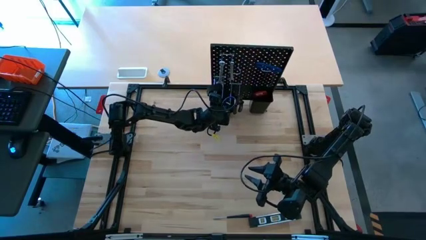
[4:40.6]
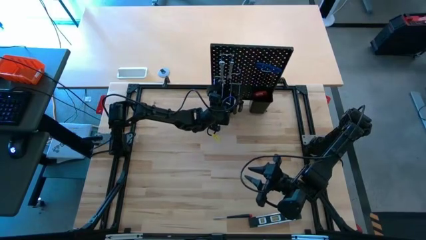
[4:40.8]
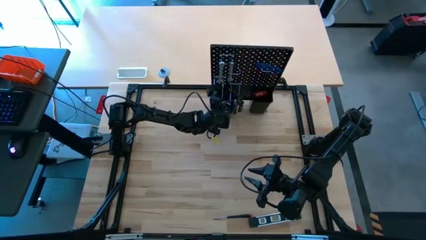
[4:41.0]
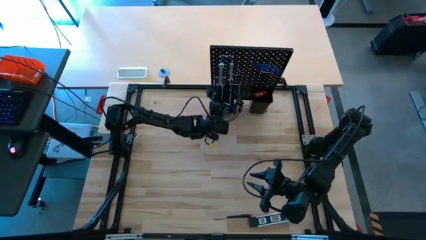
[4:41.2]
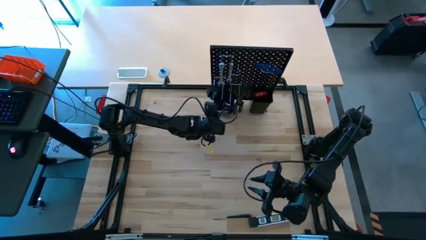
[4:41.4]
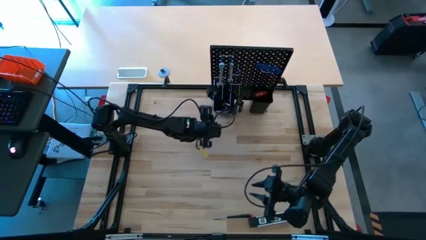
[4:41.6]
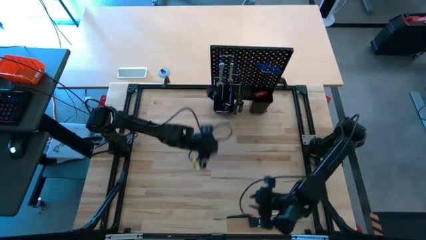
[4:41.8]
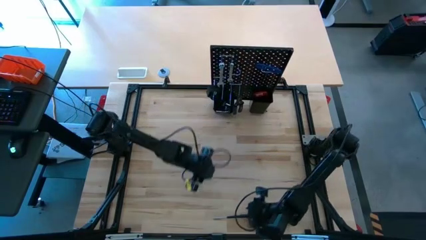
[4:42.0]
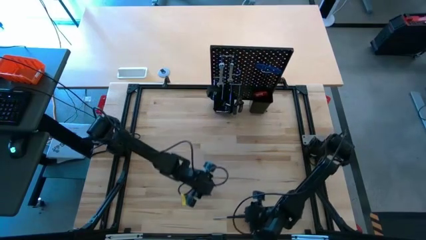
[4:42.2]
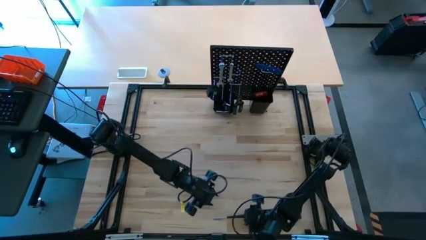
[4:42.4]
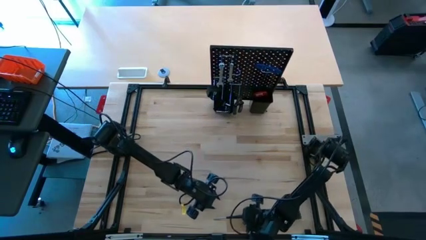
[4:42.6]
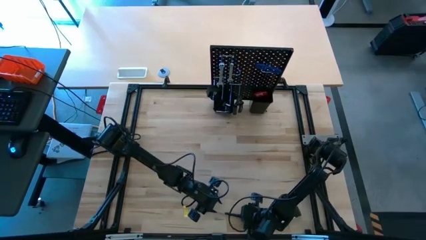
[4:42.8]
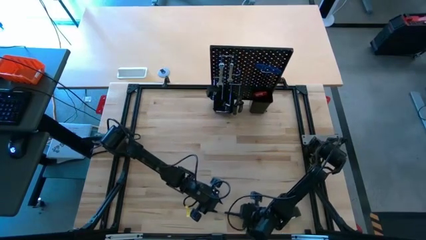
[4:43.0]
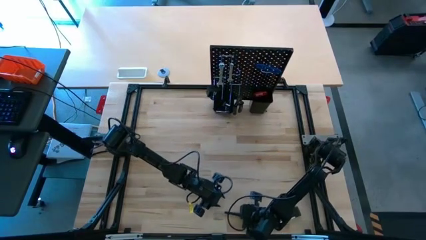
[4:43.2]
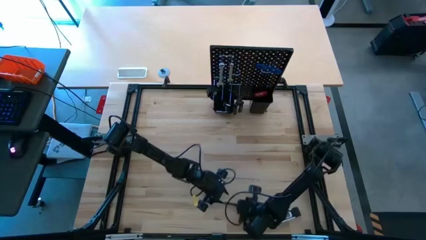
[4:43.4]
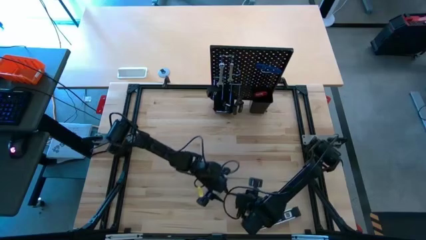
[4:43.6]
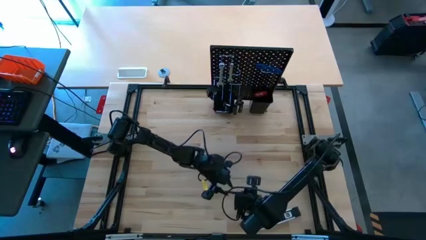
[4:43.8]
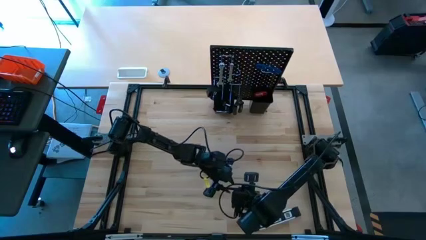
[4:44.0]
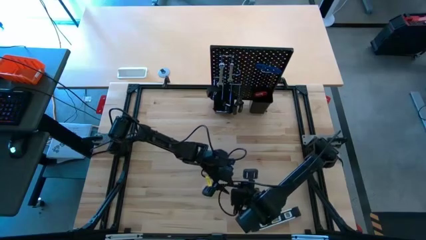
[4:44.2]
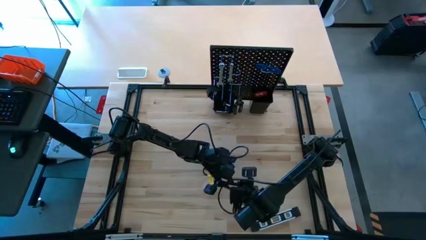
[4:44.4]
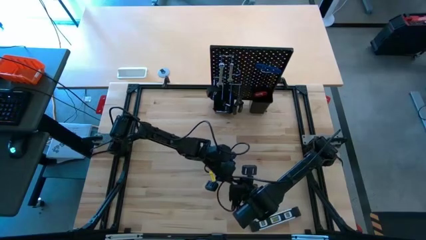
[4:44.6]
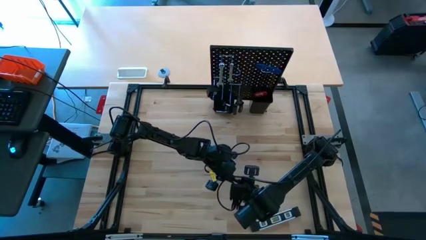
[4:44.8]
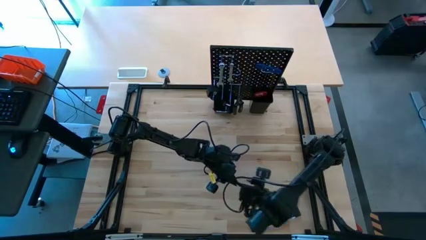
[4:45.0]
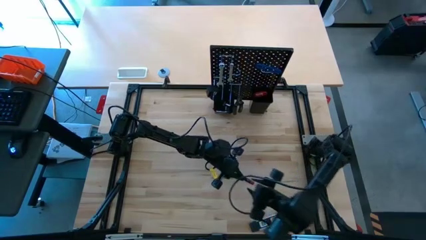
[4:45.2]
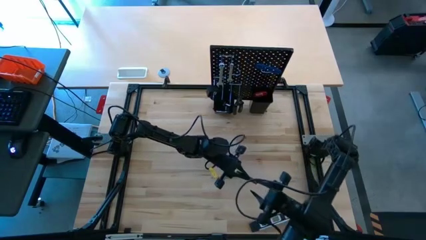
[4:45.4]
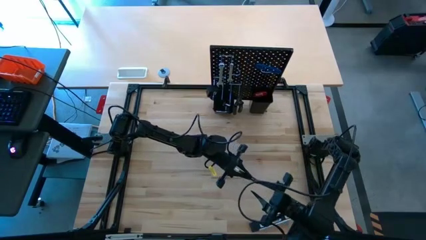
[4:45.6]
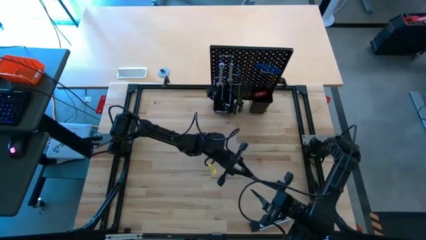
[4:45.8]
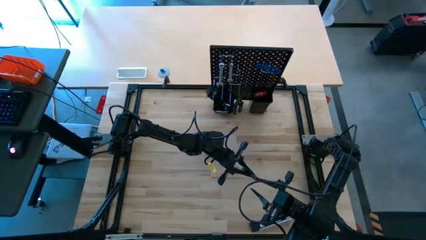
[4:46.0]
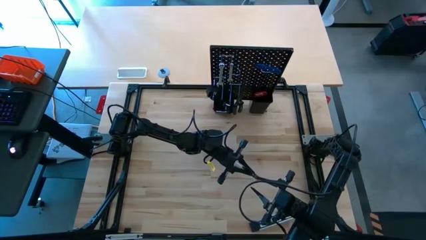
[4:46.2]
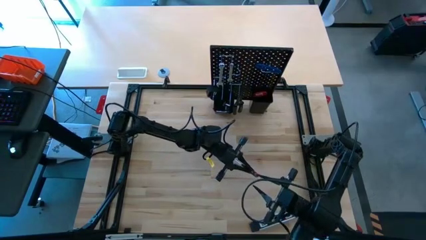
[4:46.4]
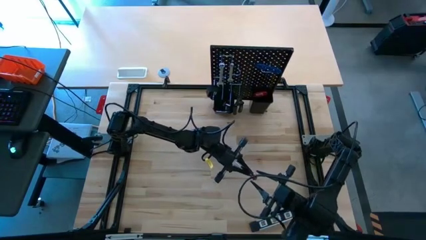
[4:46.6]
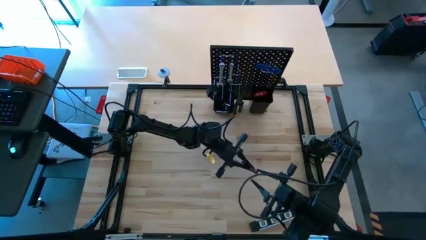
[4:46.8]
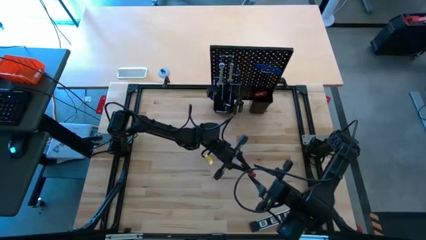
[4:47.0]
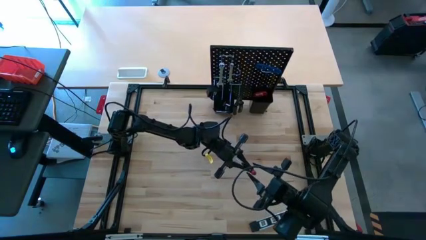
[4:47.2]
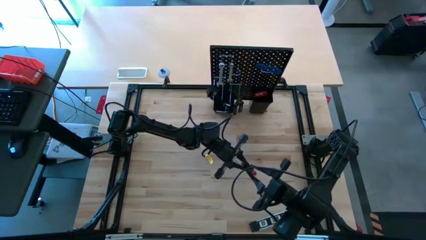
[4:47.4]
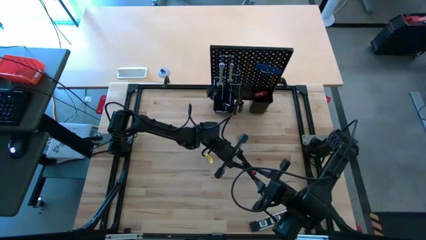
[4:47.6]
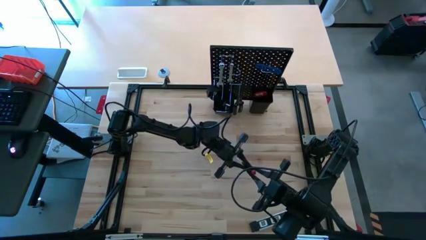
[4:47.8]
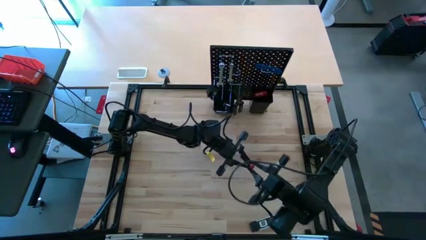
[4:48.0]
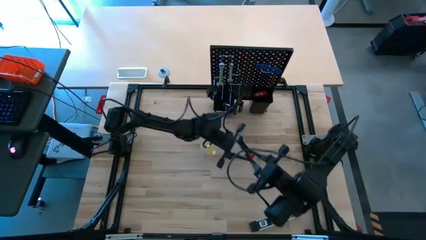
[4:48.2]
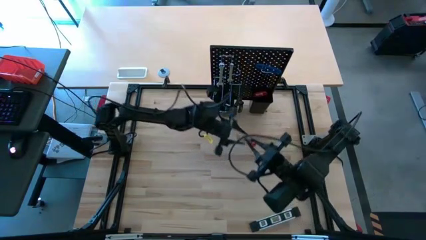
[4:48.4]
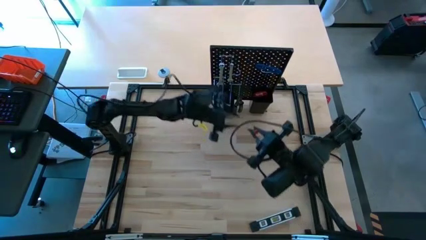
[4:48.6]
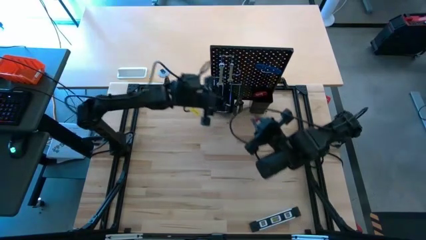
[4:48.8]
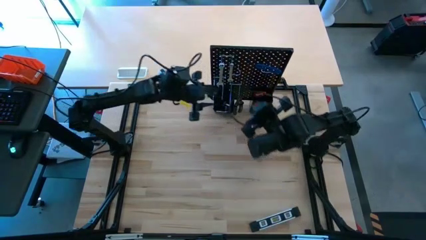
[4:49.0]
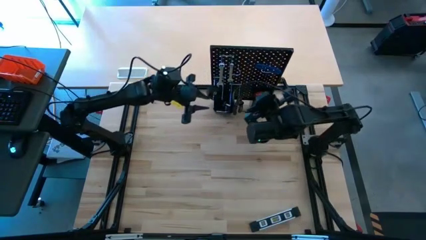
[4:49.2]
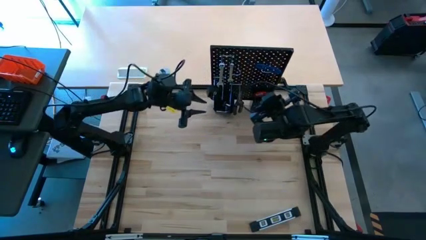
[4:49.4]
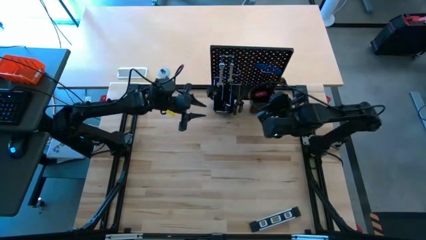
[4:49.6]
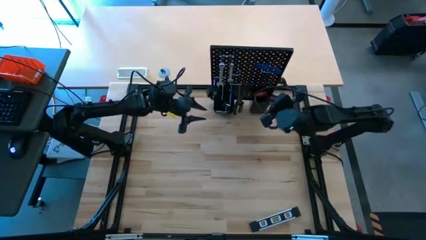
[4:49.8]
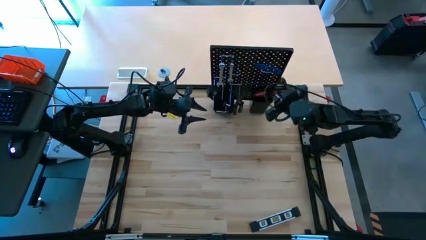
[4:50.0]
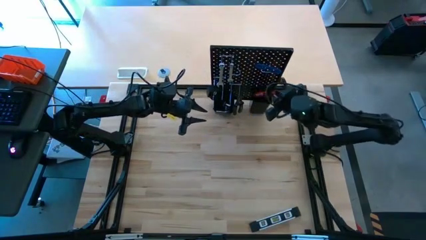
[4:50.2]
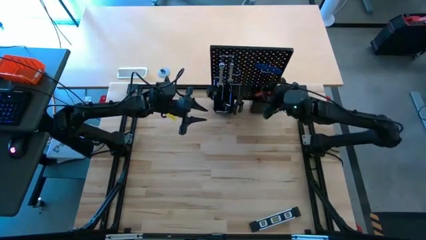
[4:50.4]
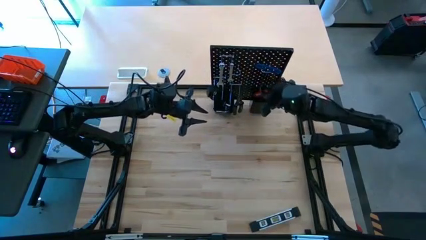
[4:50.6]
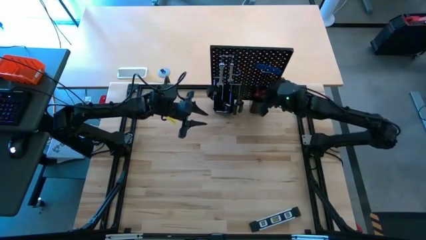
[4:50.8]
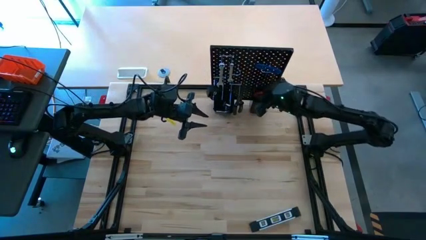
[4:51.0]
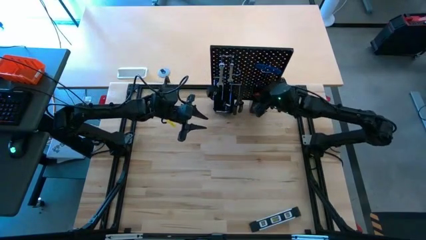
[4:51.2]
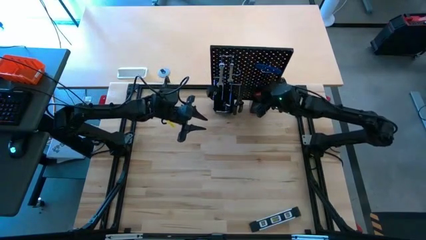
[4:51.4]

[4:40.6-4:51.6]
Task: Hang tools onto peg board
Put the nut driver into the right bin on the pegboard

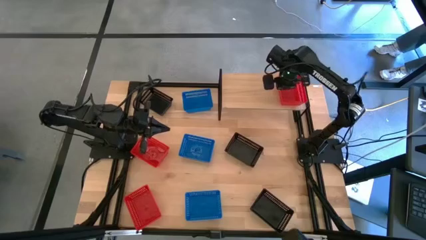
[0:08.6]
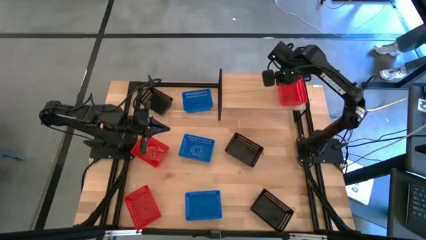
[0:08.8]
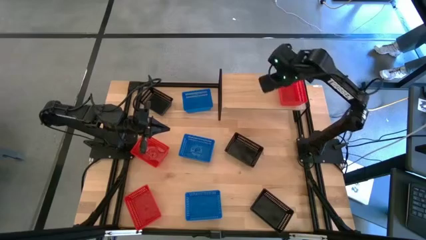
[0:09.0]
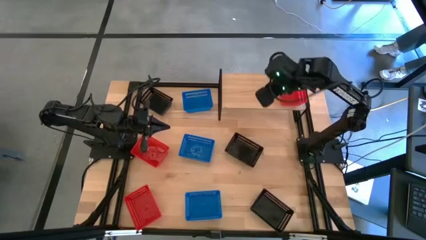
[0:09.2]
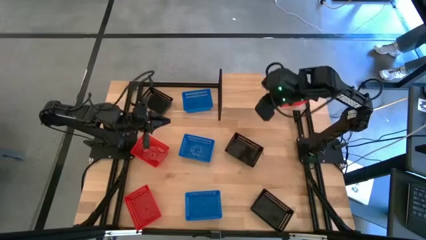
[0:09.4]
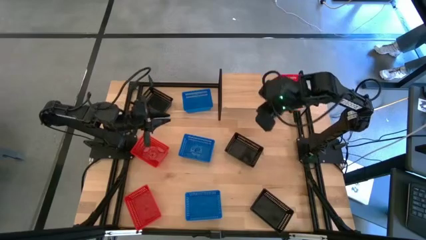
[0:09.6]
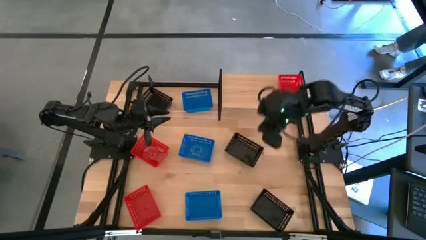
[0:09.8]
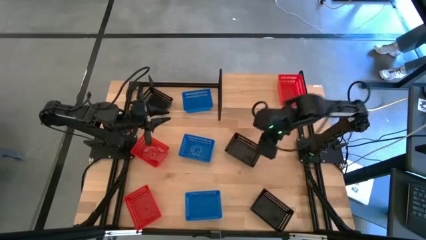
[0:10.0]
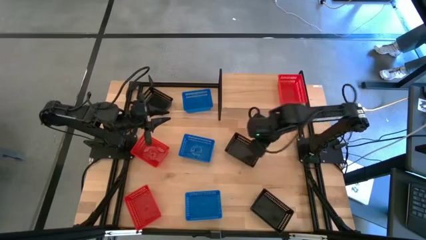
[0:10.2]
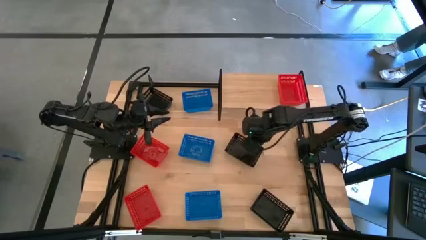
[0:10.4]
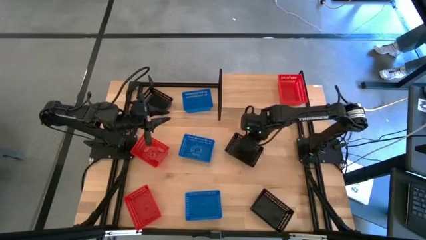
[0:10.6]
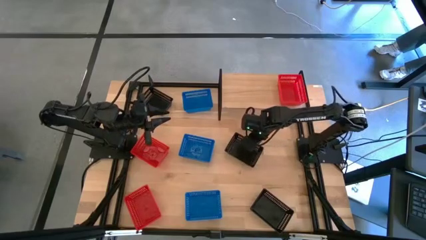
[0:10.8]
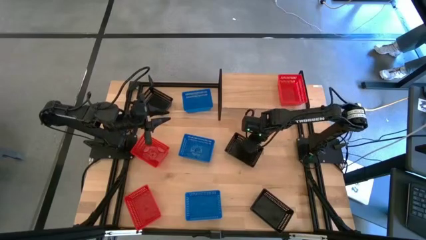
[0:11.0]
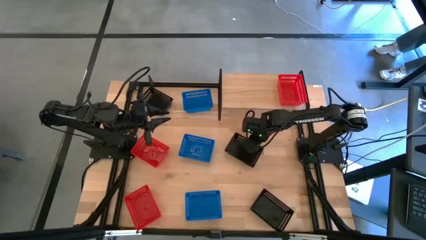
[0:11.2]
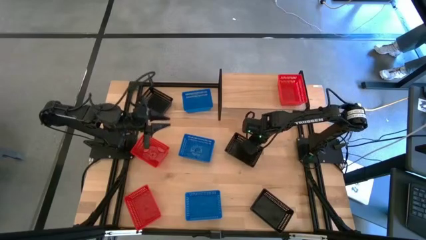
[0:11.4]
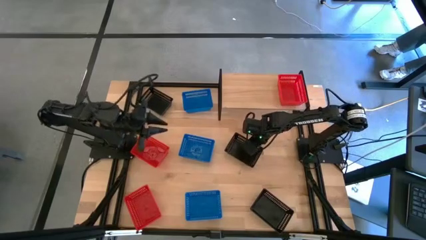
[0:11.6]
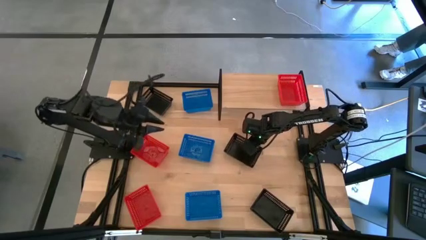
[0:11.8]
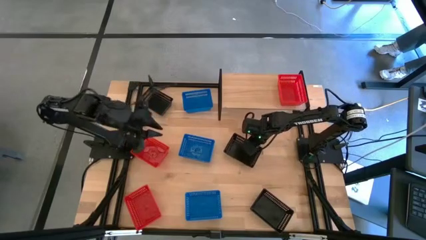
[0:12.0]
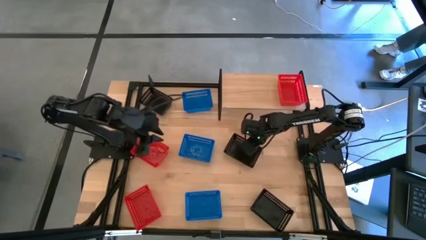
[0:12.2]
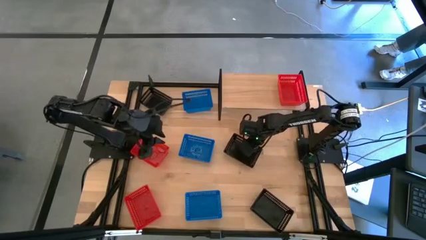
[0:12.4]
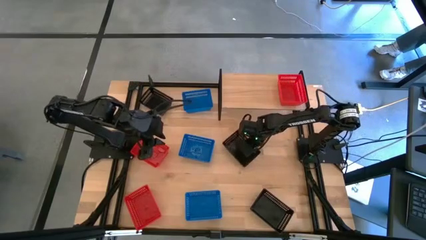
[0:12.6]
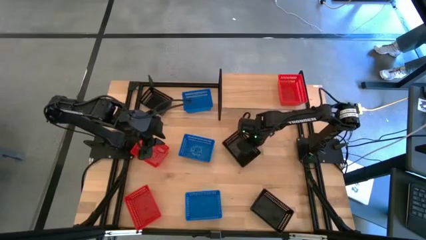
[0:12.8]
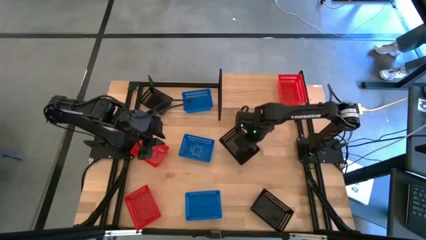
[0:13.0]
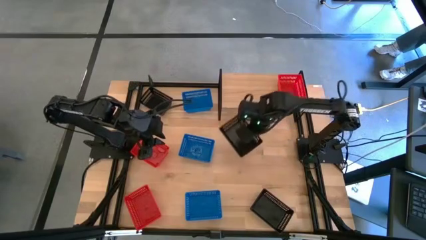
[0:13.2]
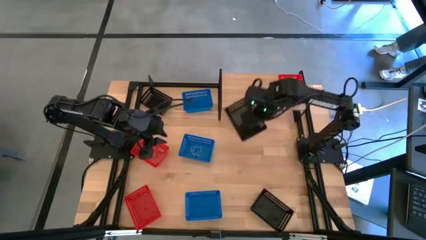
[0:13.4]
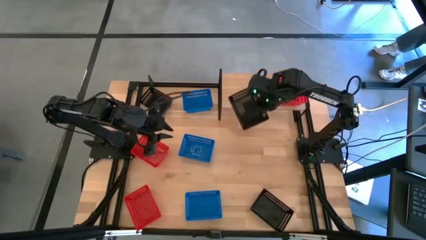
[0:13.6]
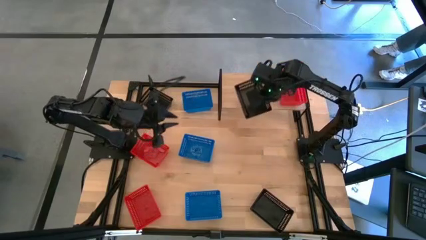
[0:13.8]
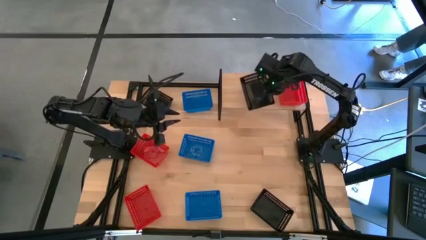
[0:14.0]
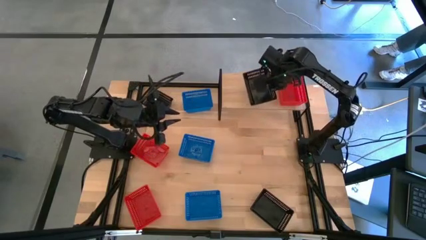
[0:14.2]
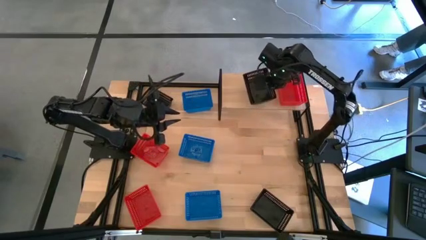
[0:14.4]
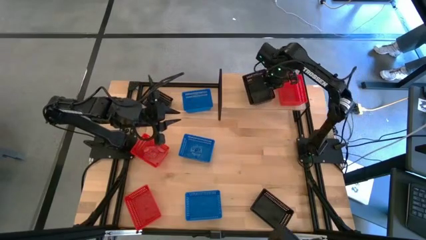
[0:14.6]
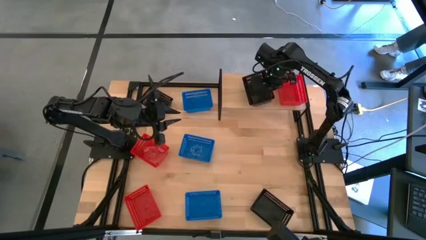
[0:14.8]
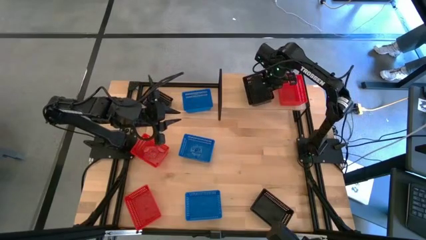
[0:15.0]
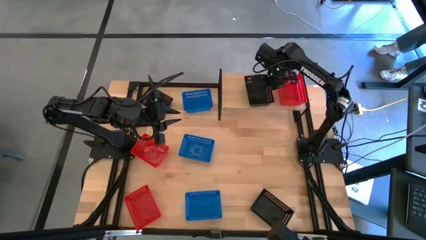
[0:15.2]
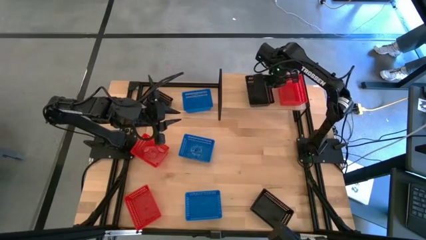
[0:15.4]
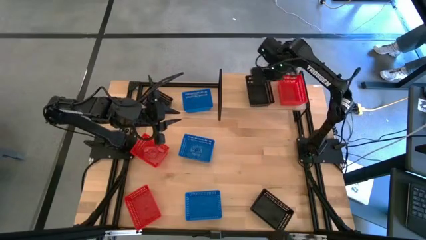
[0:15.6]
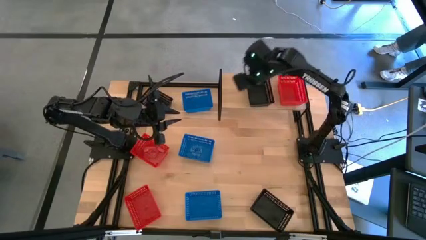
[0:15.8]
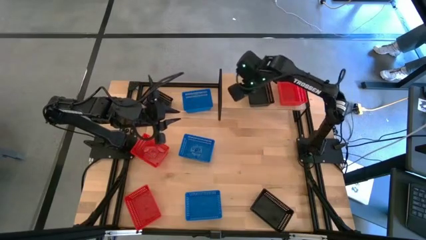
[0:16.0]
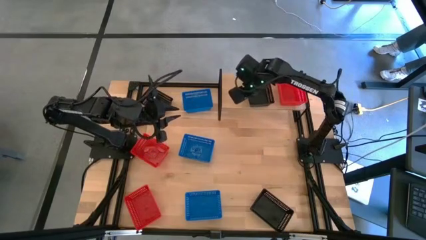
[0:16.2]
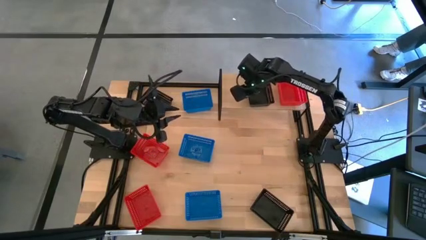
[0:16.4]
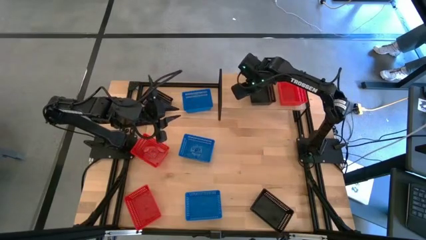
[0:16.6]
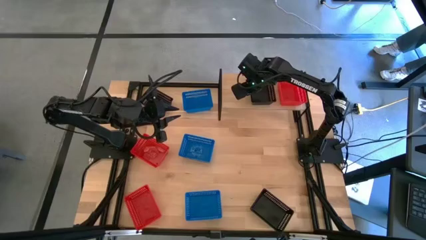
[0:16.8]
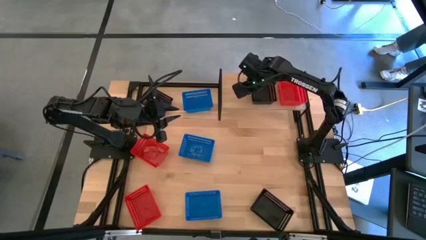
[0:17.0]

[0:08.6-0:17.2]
Task: Stack baskets on shelf by color
Put the middle right black bin on the shelf
